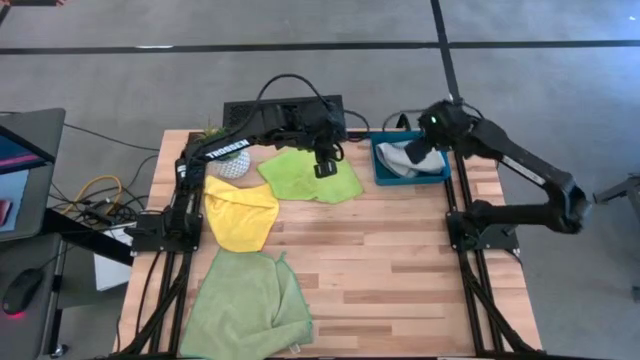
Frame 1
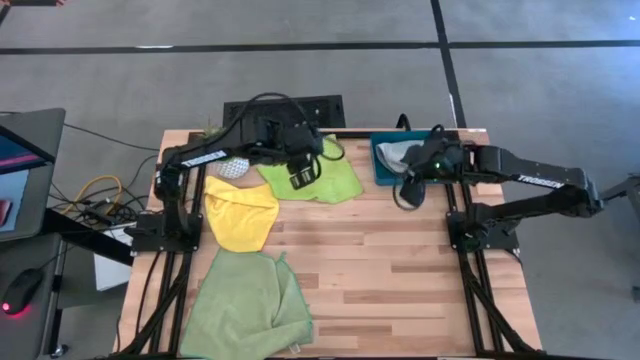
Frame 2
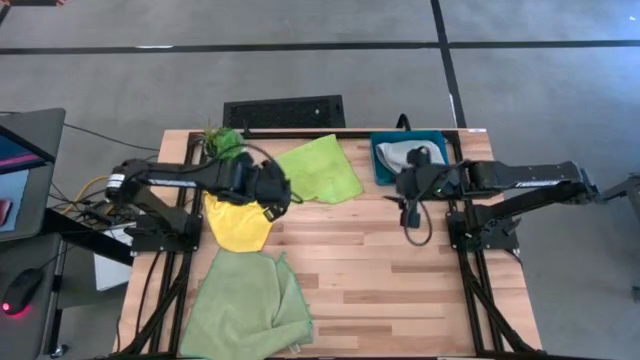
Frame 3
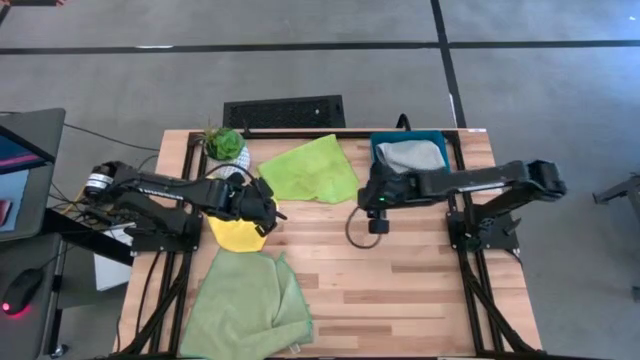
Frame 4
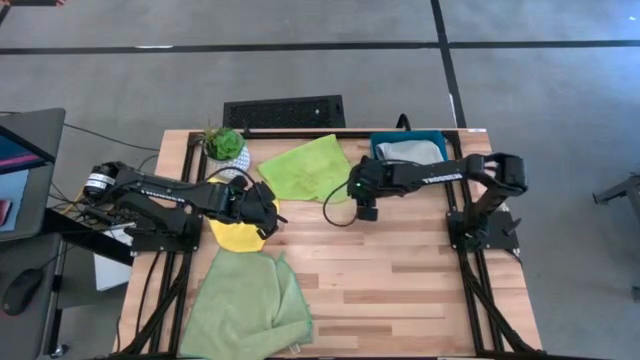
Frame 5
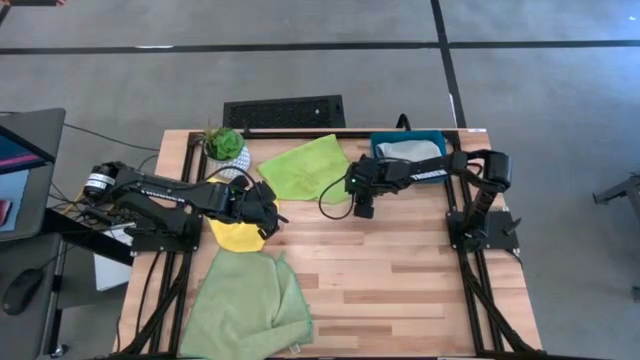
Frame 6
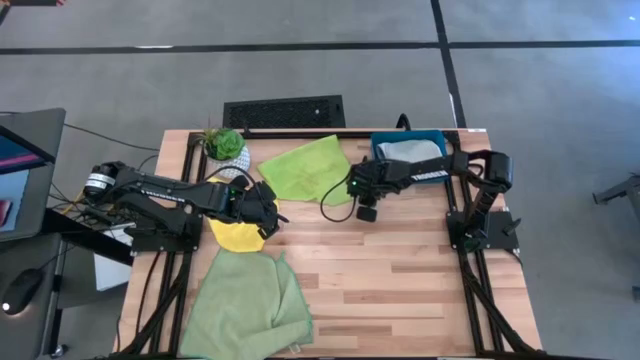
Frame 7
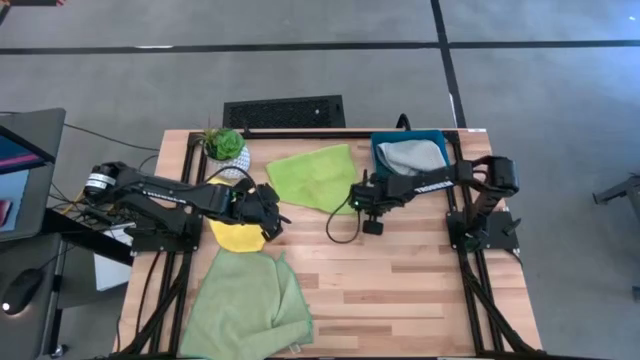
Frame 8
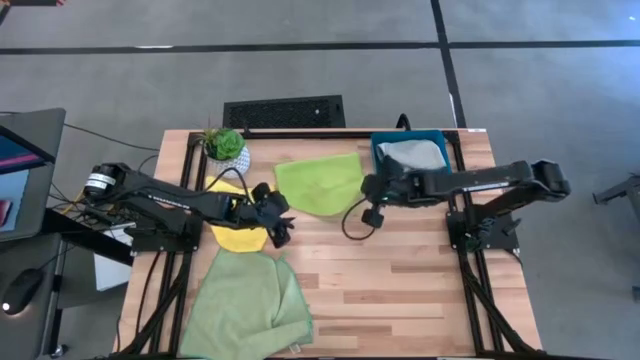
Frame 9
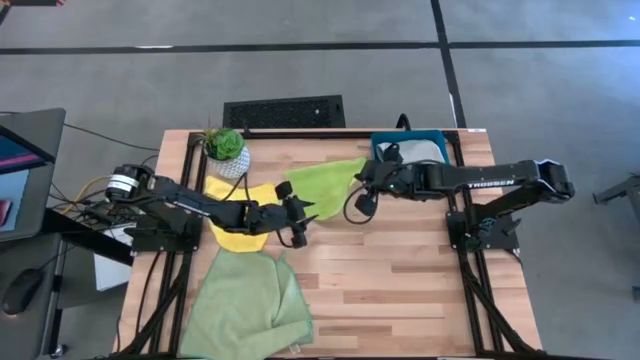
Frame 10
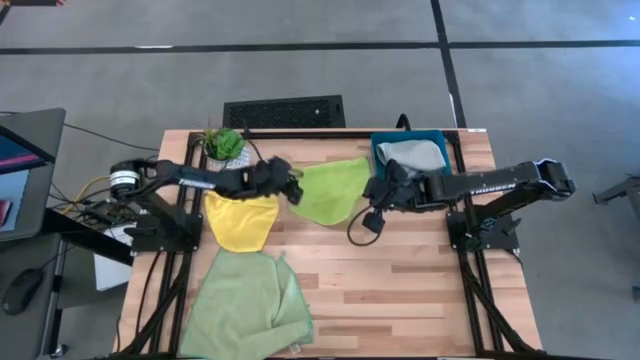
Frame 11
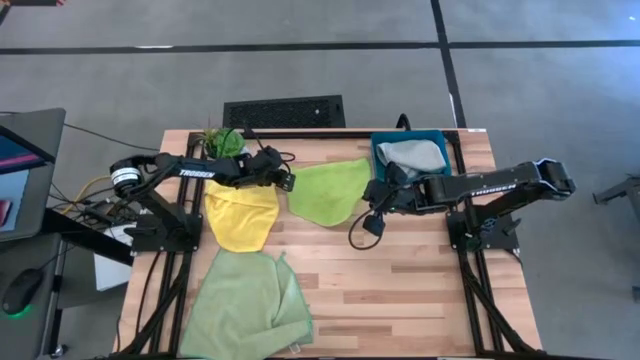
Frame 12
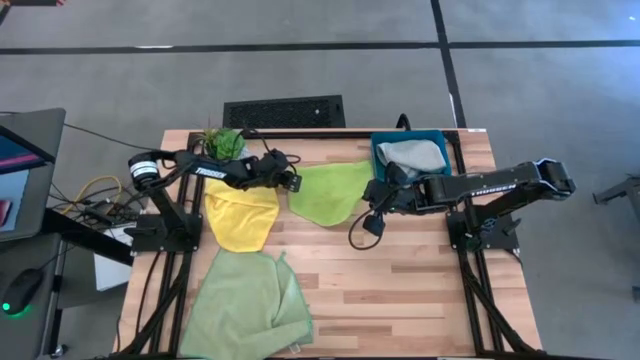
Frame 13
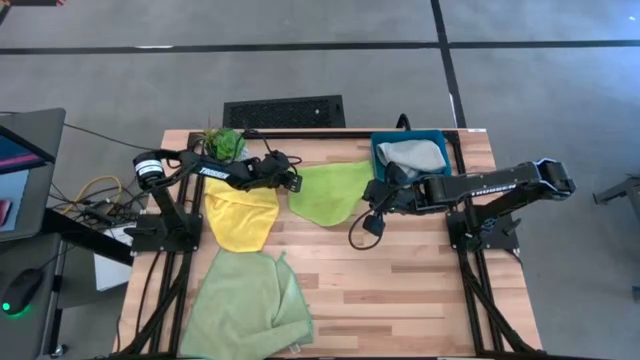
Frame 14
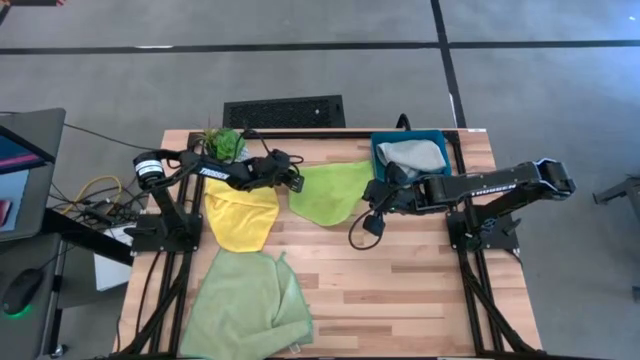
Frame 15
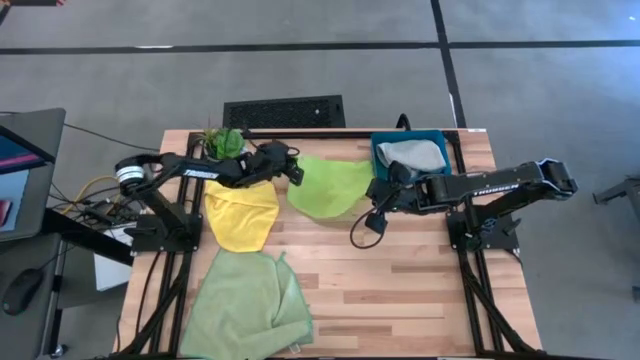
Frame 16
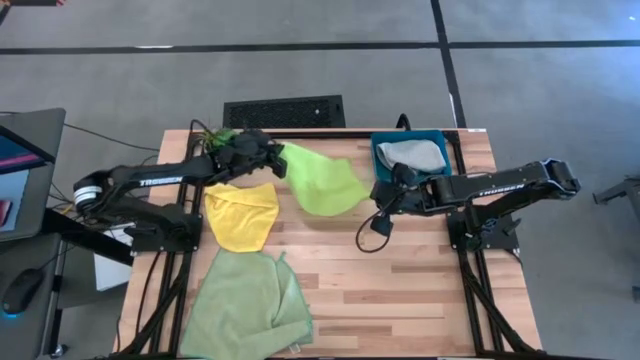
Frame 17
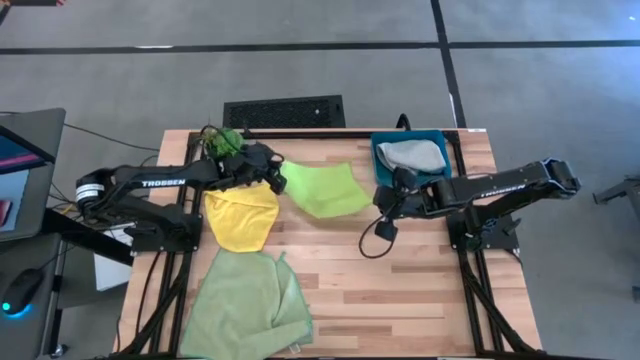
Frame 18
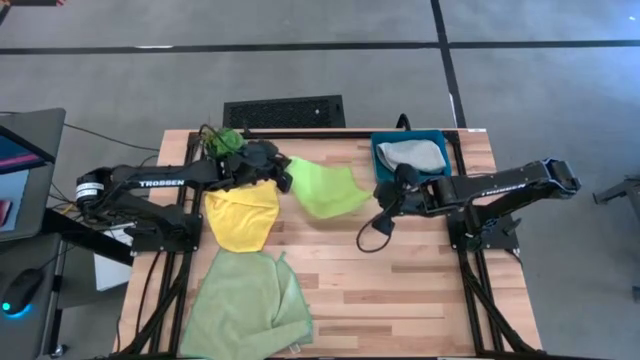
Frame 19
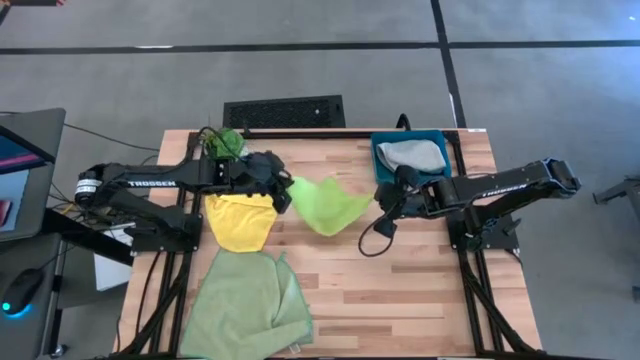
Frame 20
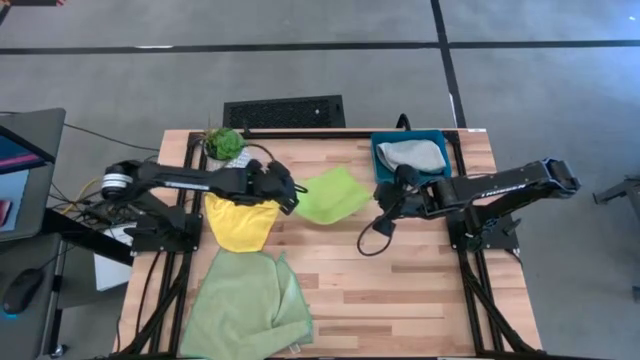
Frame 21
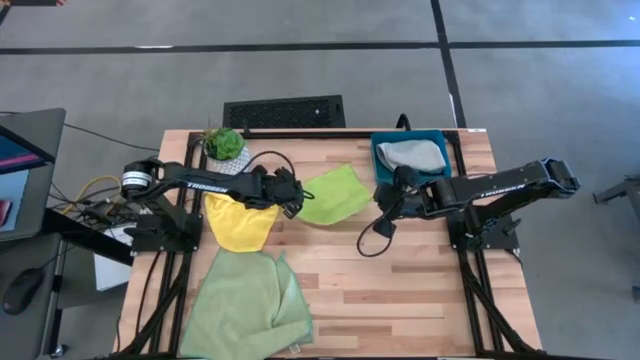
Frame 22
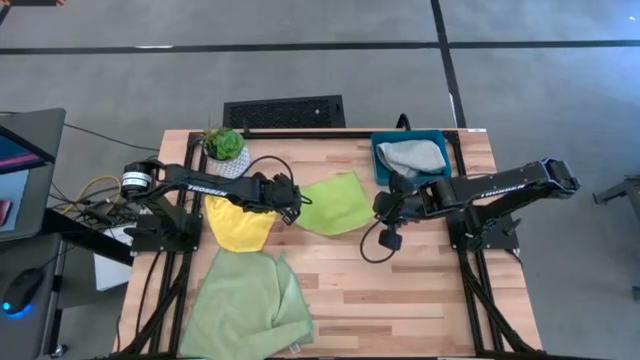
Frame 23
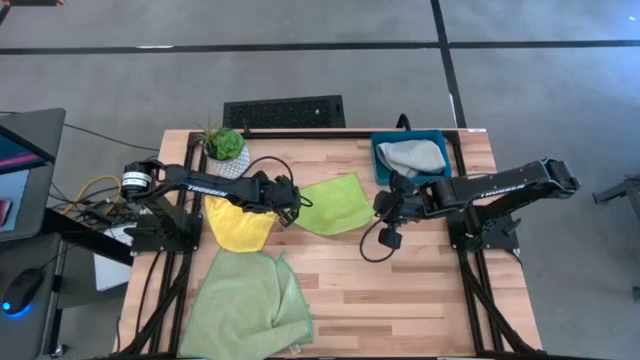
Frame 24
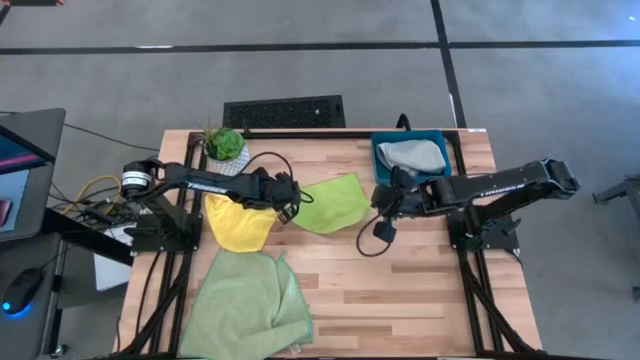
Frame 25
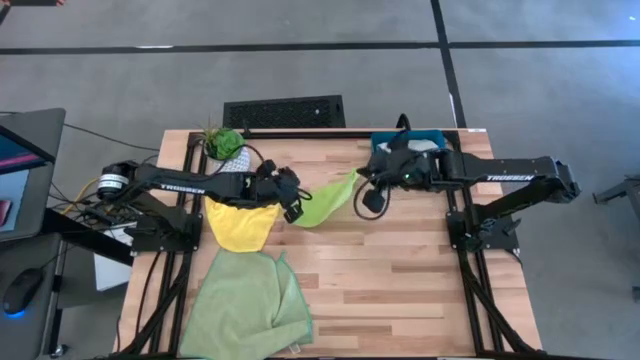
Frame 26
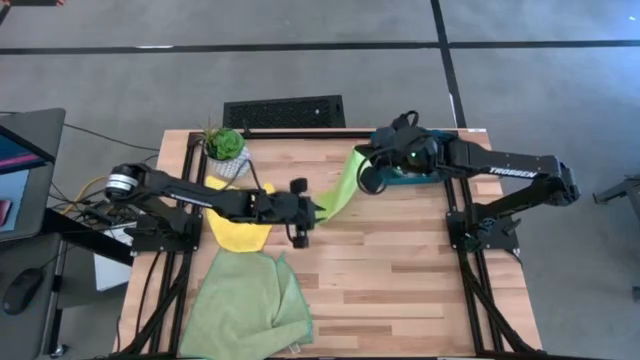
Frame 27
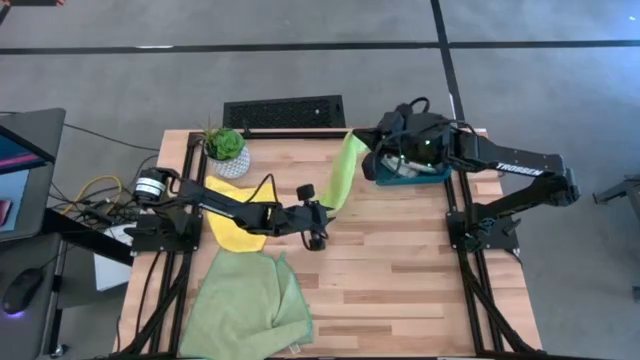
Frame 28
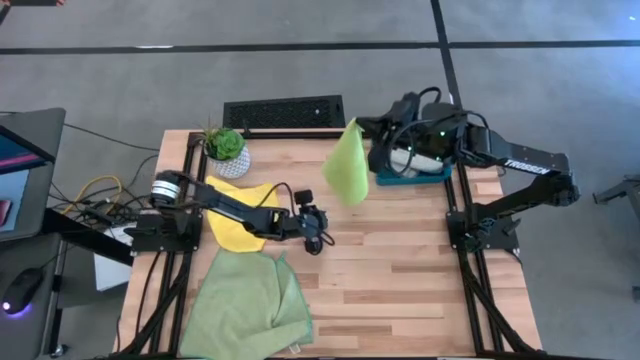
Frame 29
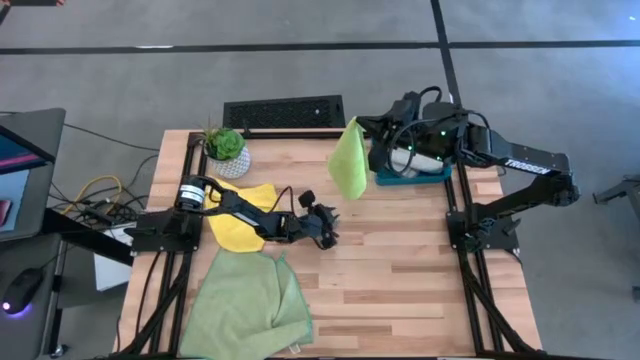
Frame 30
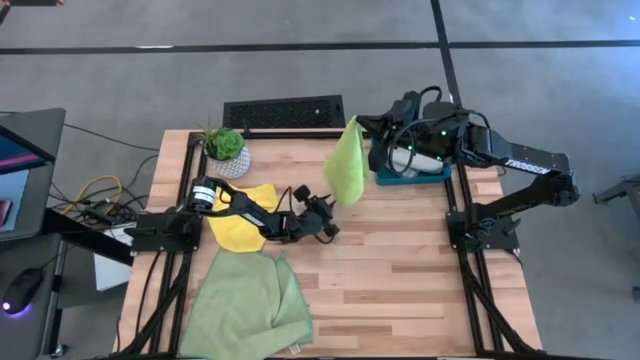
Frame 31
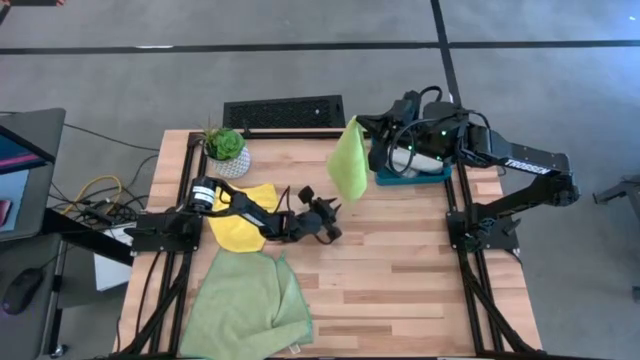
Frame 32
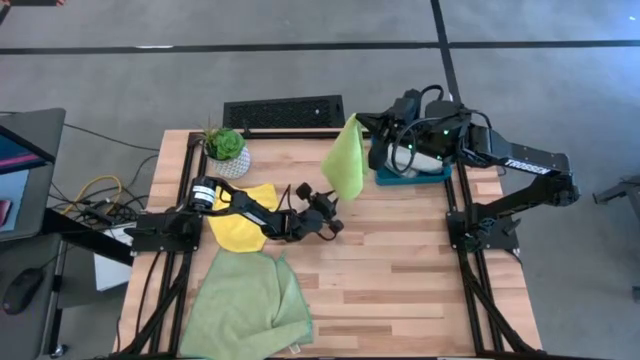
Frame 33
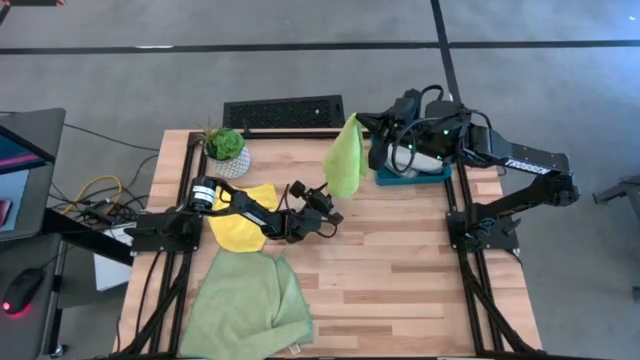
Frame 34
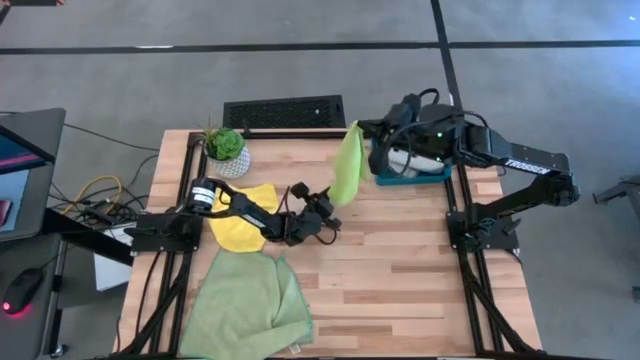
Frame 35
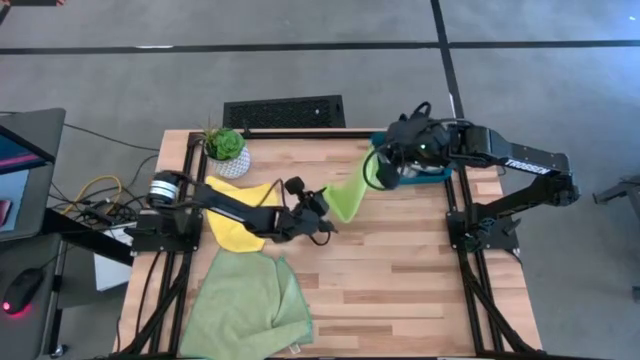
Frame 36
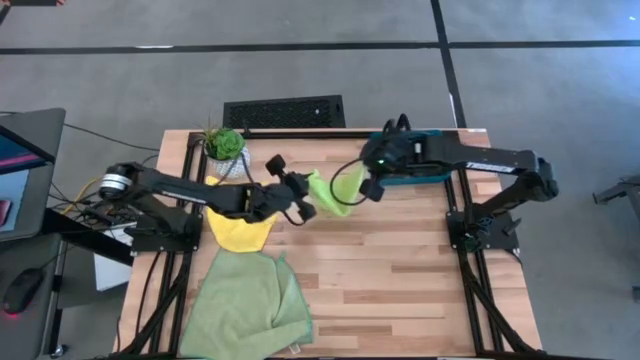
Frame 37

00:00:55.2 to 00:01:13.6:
Task: Fold microfiber towels
Fold the light green microfiber towel

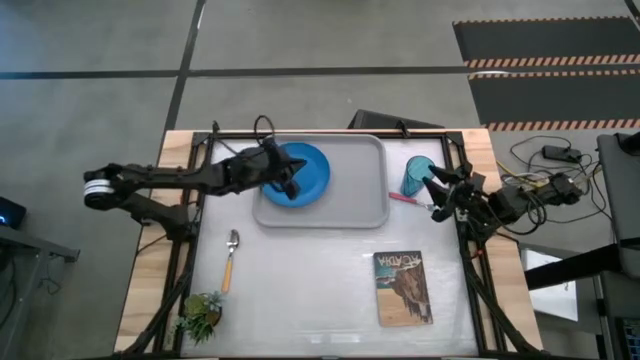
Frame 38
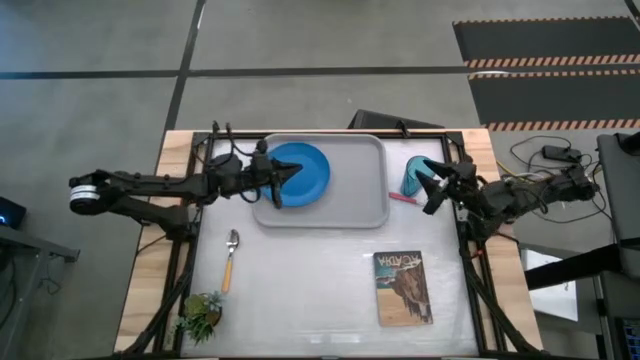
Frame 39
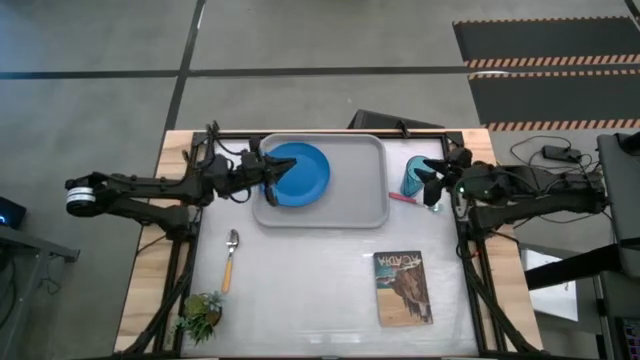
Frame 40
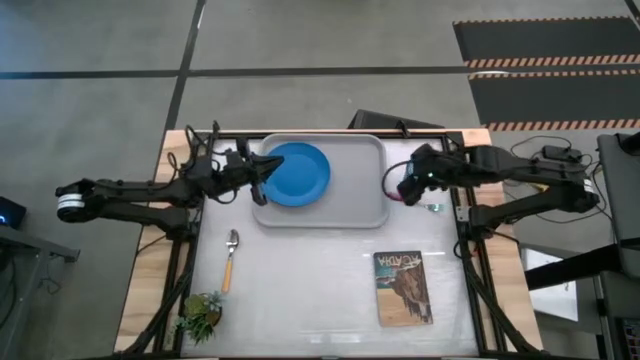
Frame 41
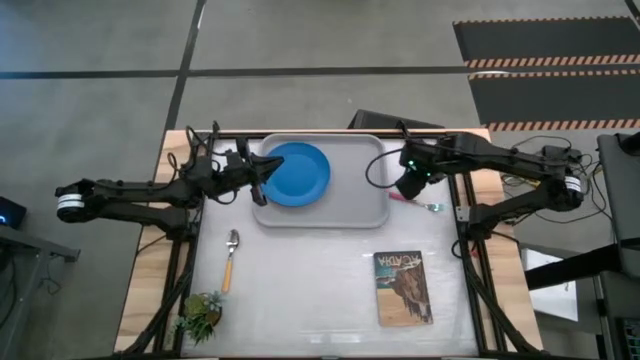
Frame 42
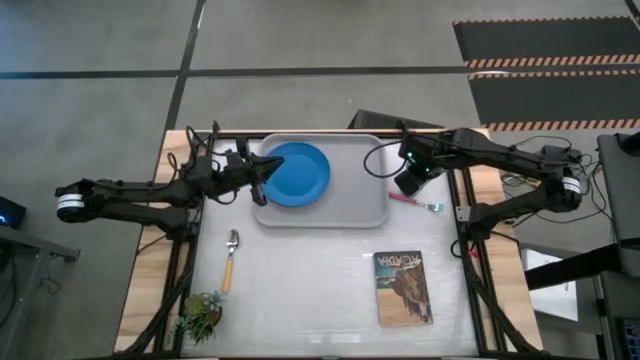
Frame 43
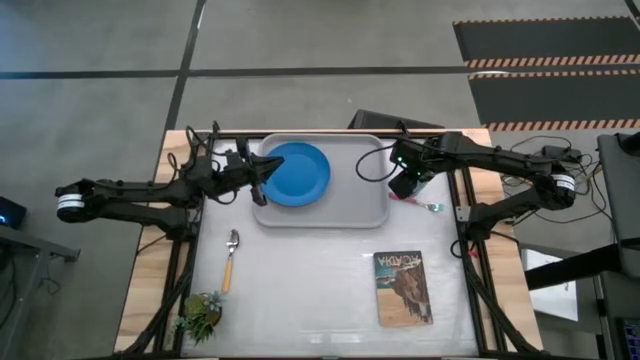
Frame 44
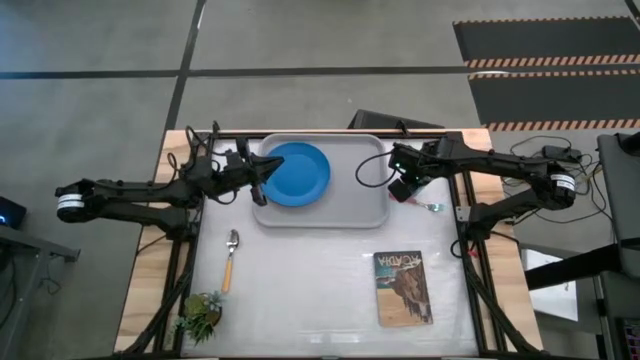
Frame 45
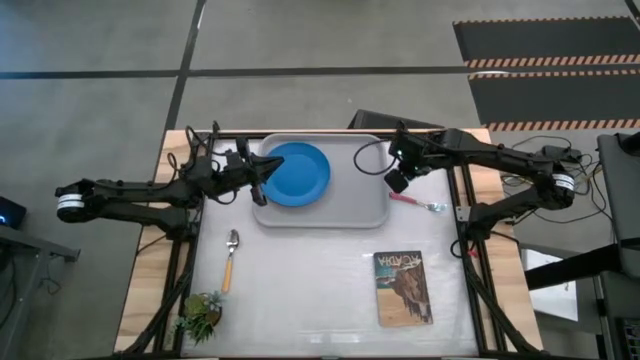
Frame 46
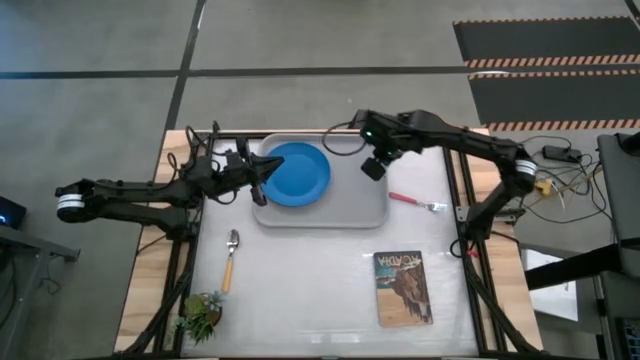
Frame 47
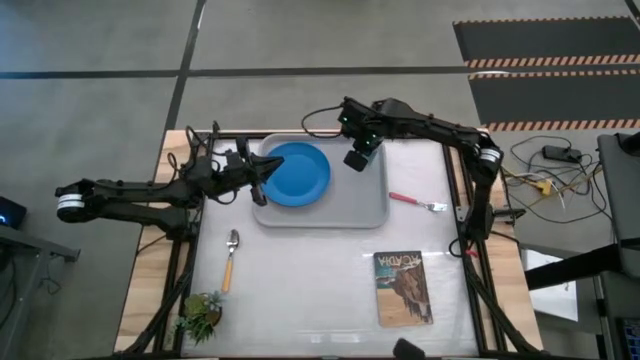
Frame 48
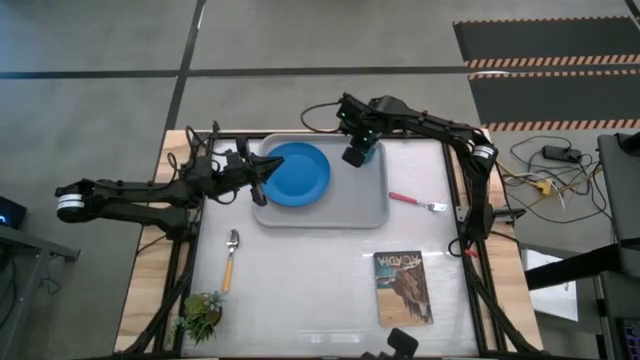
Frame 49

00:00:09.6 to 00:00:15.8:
Task: Pick and place plate/cup/fork/spoon on tray
Put the blue cup on the top right of the gray tray
